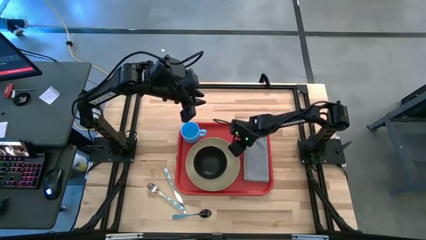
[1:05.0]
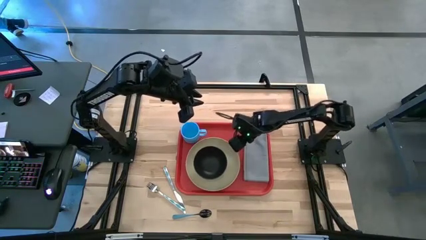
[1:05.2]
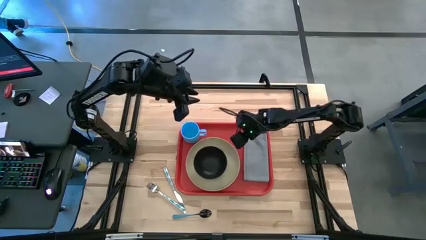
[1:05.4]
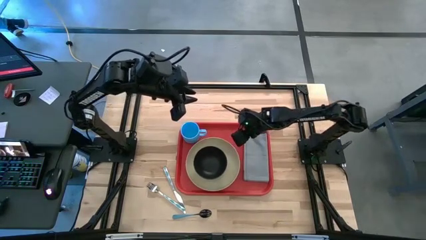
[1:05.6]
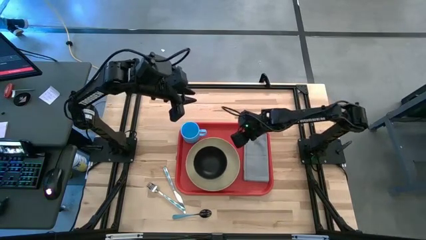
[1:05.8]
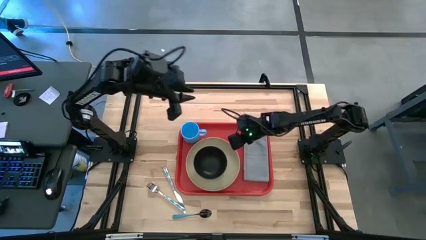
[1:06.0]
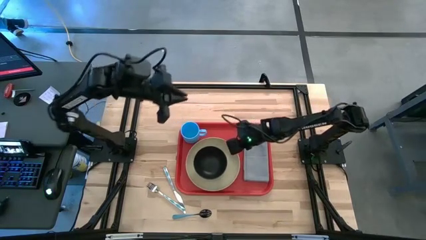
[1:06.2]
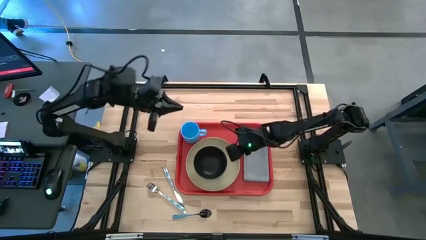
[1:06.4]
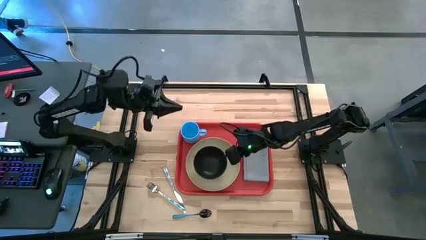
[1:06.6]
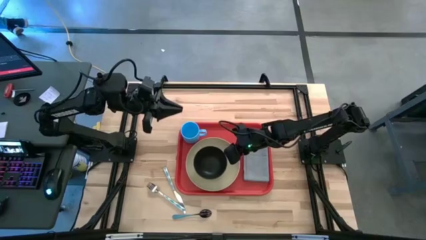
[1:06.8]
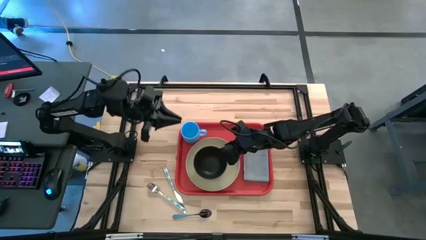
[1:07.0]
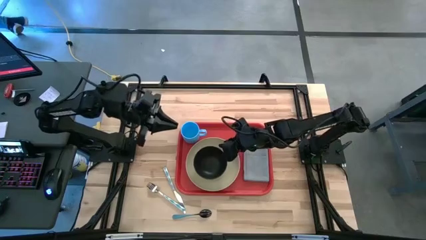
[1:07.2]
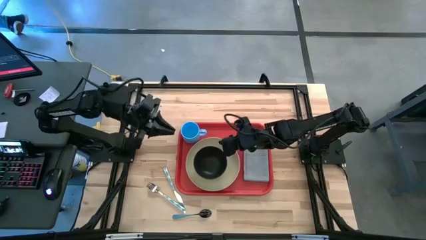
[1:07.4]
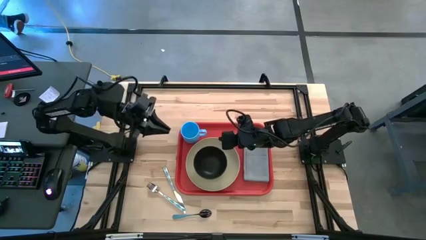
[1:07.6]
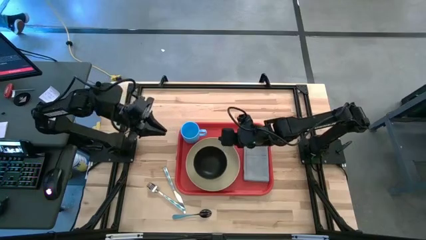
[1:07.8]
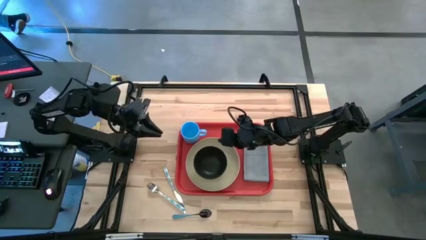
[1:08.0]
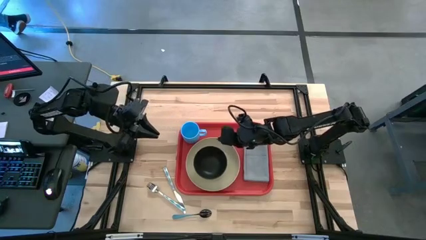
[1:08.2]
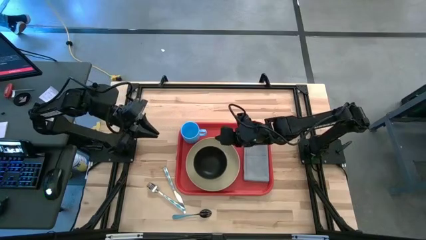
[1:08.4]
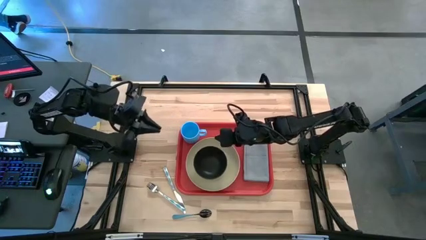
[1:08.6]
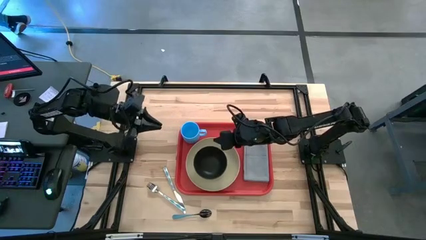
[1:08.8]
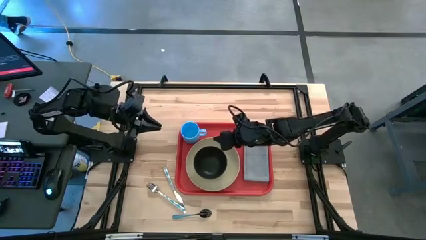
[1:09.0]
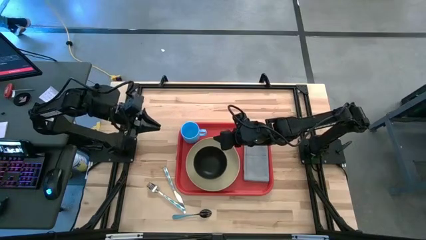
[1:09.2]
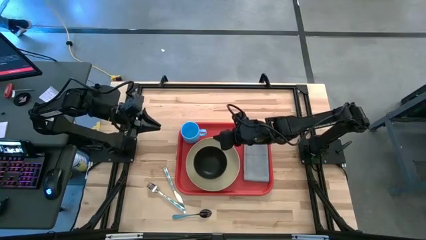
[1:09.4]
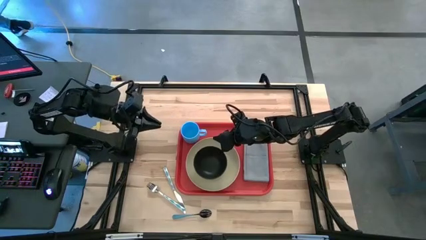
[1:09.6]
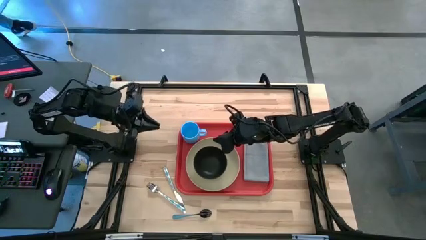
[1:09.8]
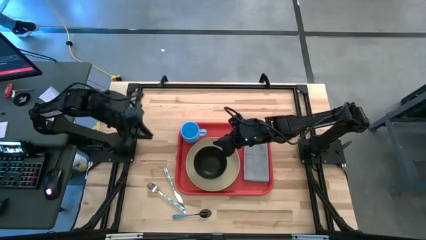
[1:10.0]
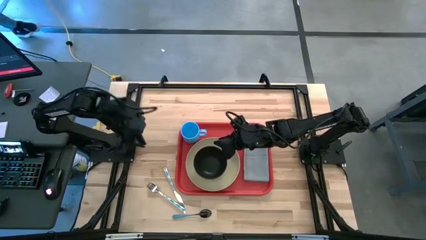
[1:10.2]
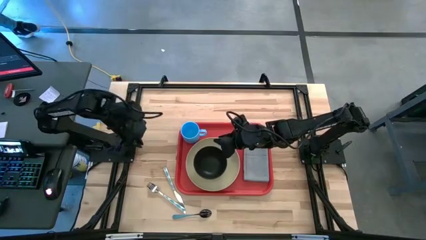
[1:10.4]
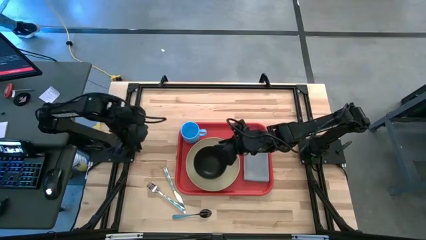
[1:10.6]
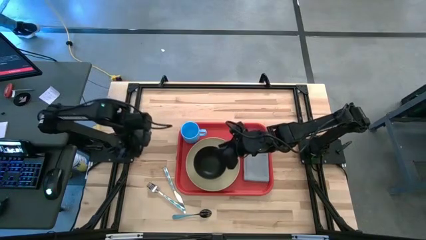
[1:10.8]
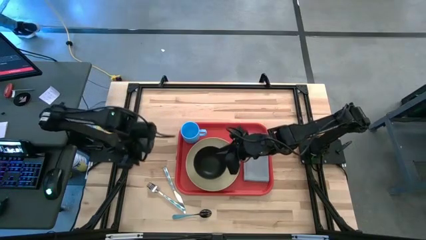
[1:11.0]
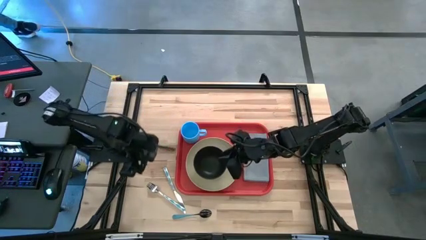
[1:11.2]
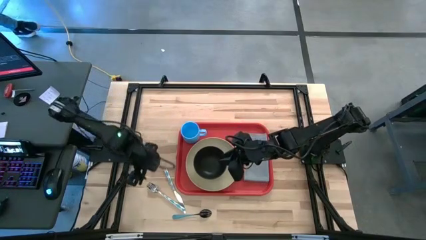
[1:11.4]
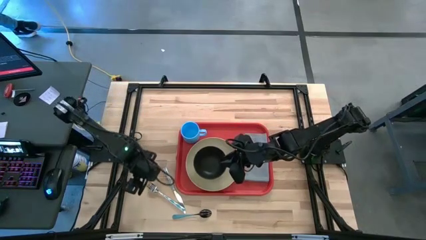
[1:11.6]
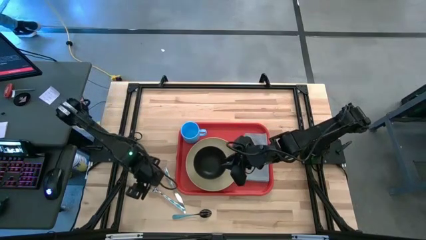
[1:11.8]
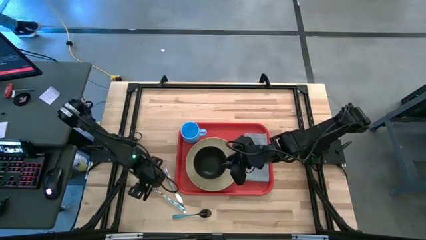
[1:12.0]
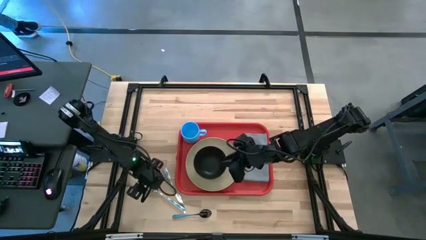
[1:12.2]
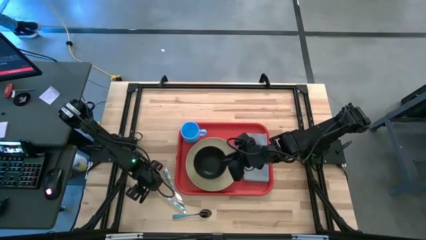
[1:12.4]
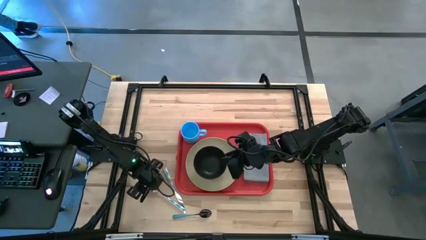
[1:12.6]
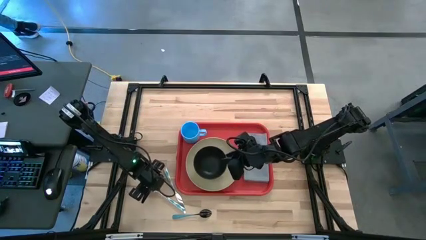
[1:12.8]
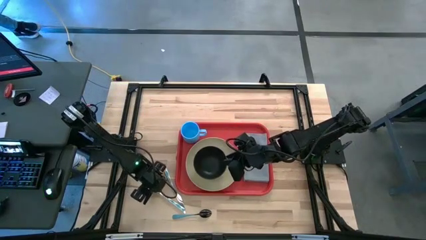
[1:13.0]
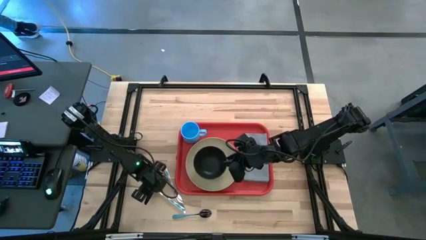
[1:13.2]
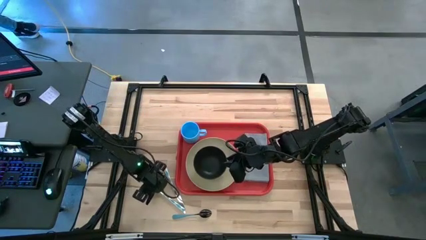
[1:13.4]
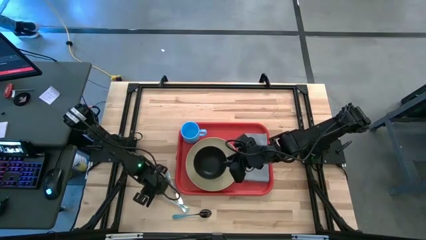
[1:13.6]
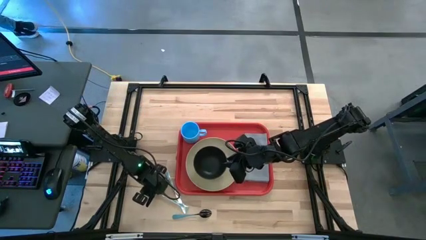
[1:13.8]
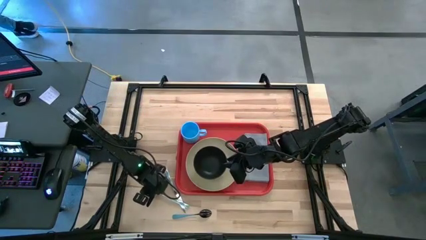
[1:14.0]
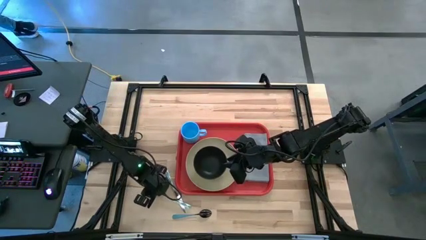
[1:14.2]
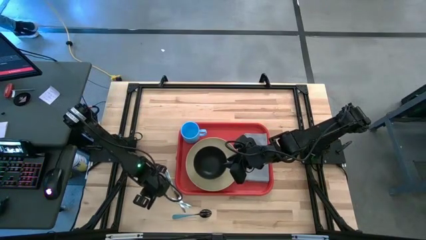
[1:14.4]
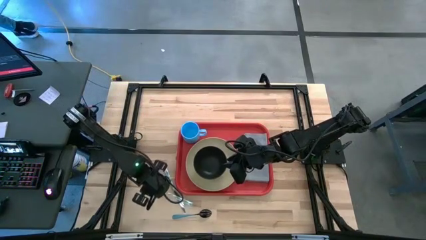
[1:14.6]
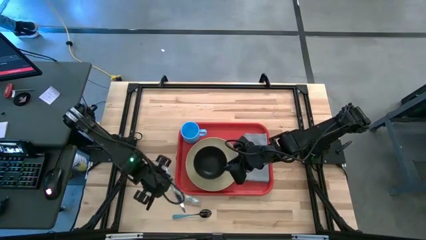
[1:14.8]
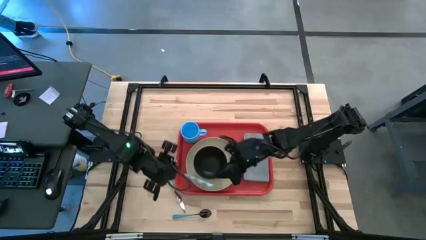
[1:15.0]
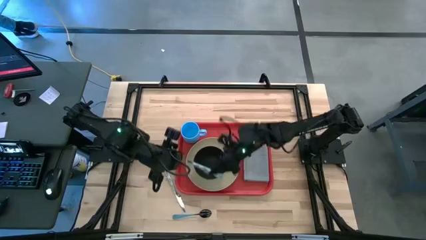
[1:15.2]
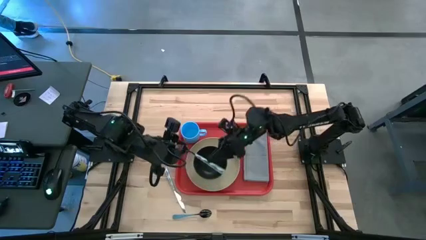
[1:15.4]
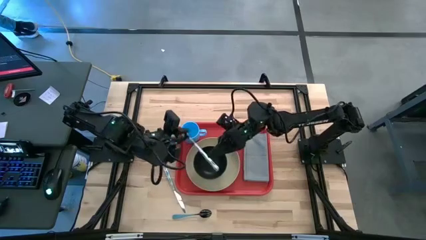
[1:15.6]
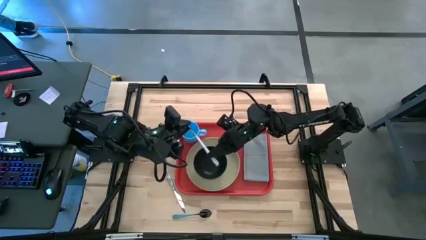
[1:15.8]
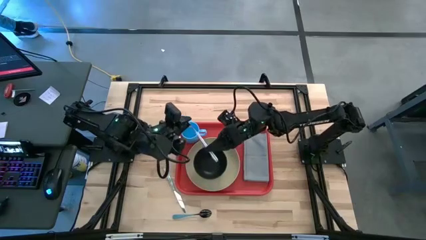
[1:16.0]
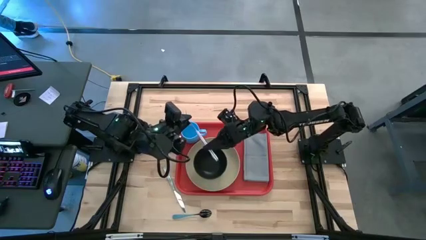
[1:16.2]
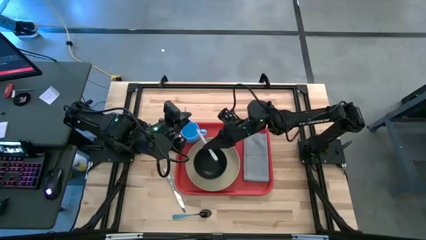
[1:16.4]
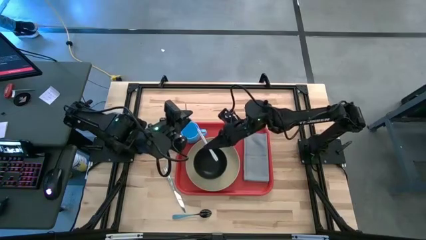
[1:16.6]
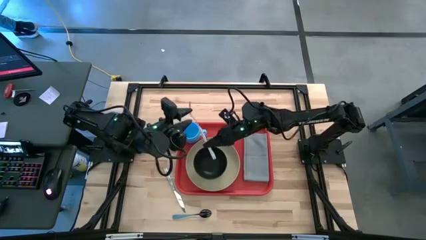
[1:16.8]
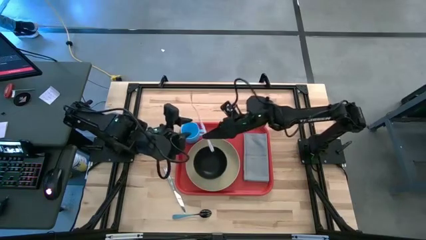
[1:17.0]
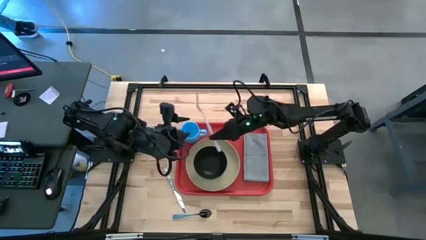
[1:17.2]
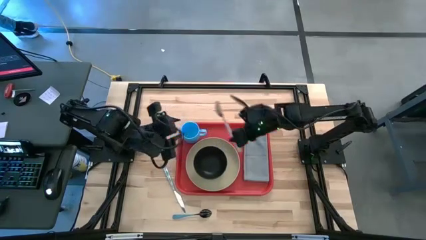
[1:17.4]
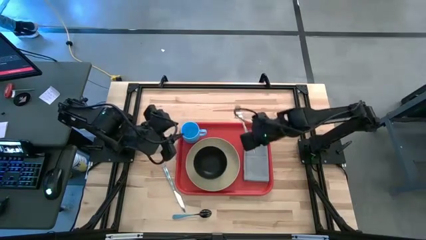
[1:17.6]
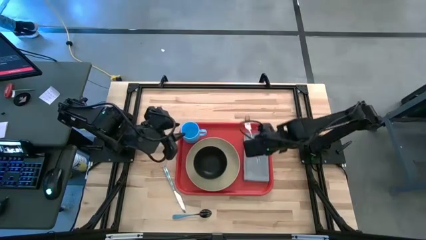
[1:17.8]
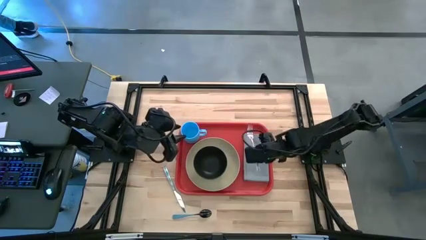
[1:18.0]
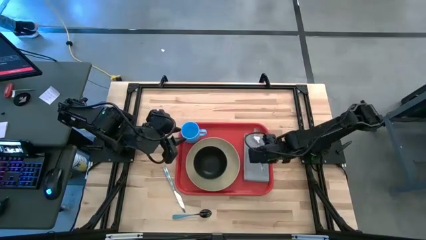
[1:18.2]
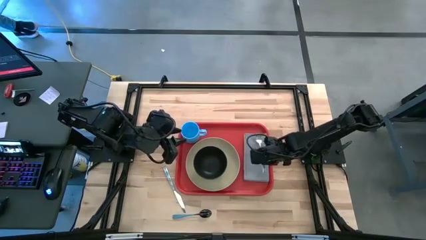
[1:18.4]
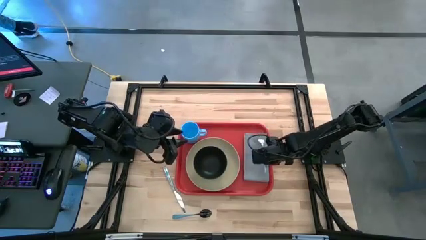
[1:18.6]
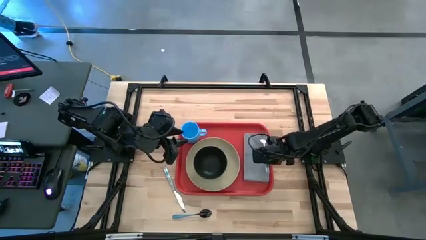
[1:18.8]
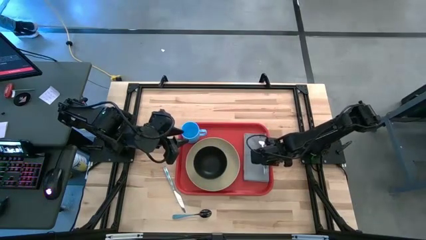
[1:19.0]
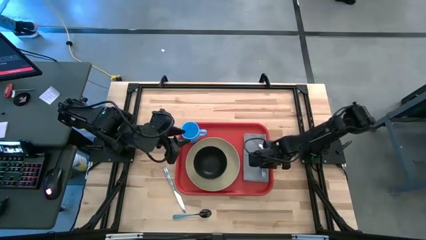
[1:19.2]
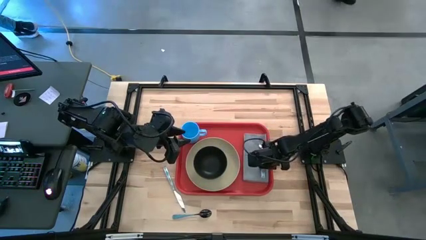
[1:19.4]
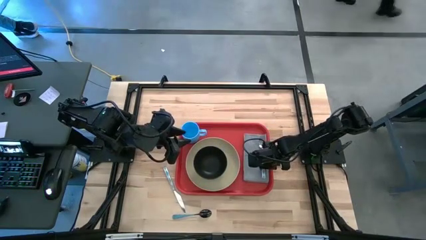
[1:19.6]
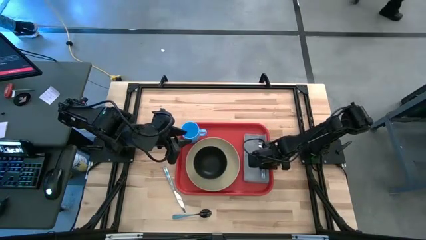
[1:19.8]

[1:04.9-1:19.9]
Task: Set up tray
Put the blue fork on the gray napkin

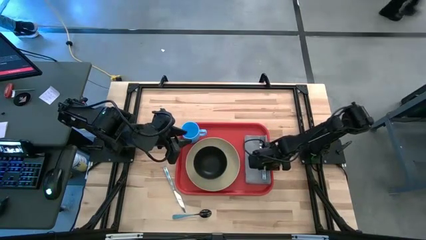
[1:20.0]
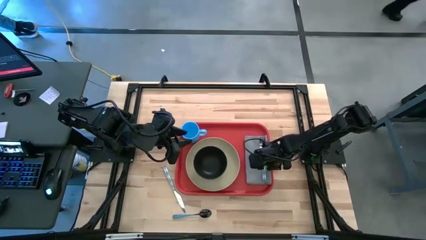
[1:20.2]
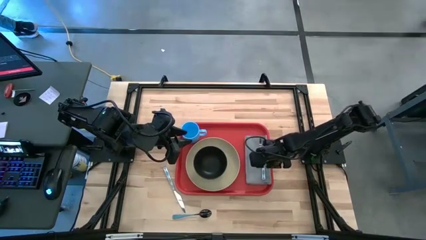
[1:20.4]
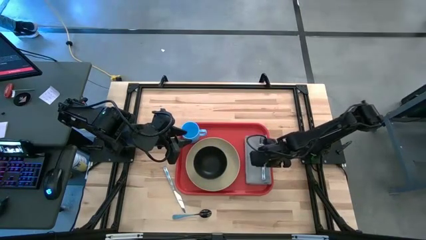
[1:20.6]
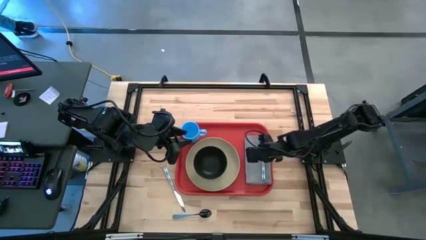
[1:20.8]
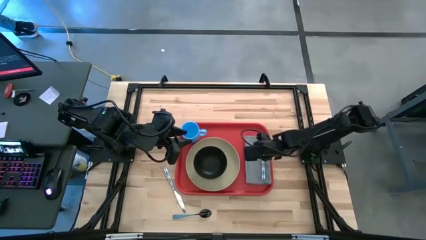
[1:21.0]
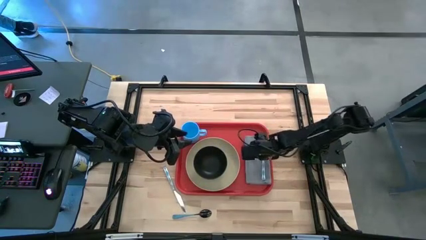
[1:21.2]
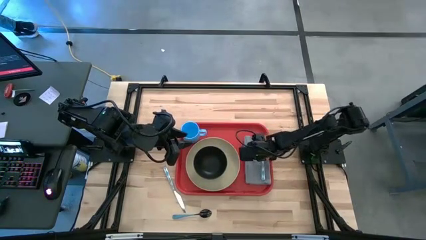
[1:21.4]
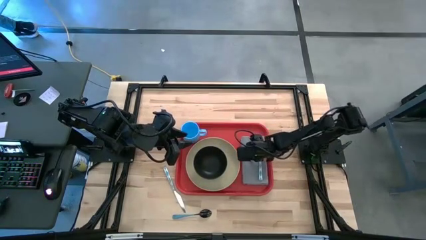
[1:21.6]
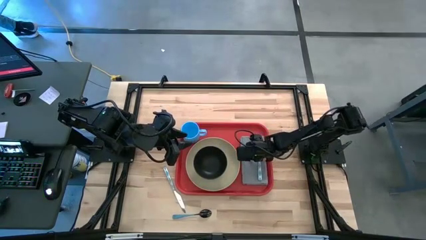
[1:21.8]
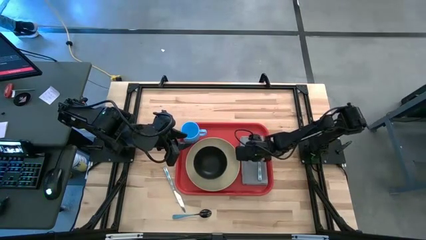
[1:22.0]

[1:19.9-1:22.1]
Adjust the gray napkin
